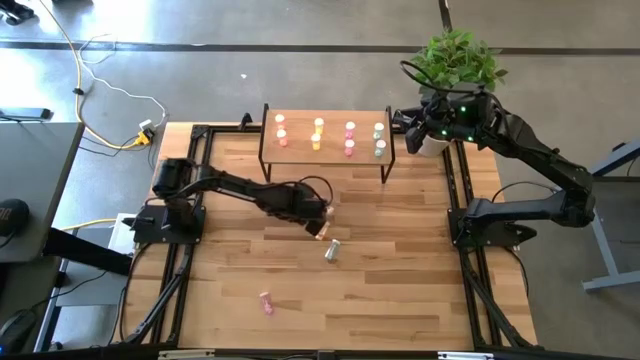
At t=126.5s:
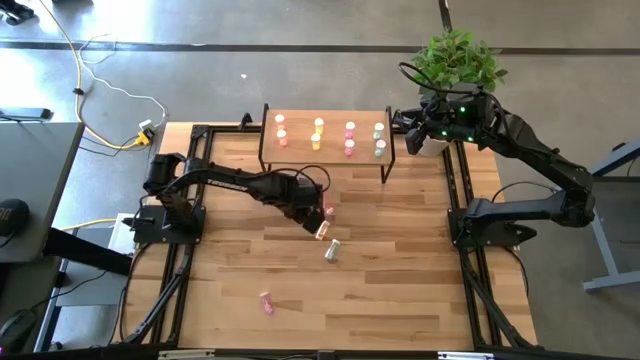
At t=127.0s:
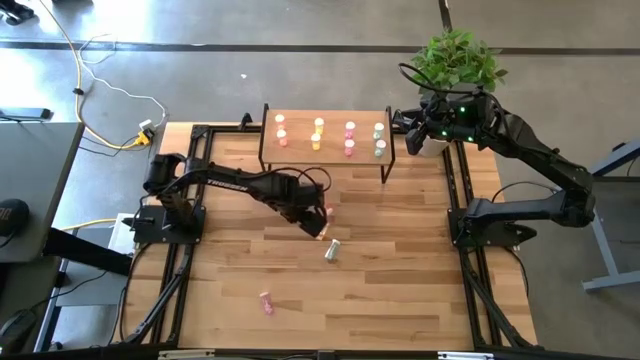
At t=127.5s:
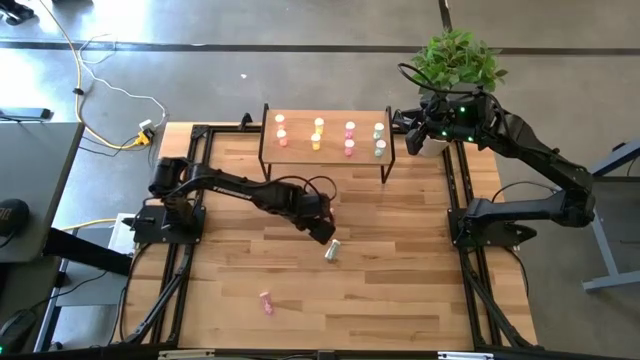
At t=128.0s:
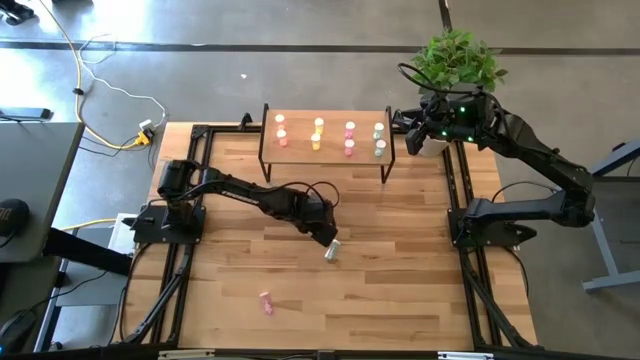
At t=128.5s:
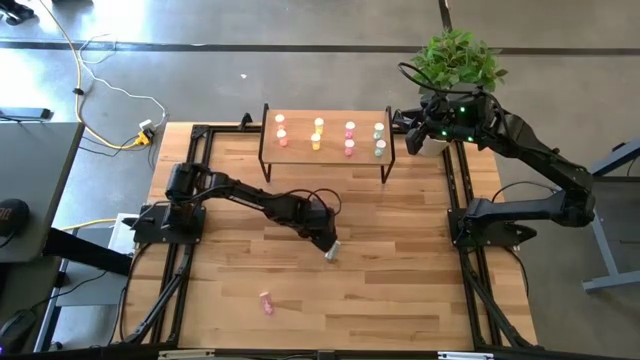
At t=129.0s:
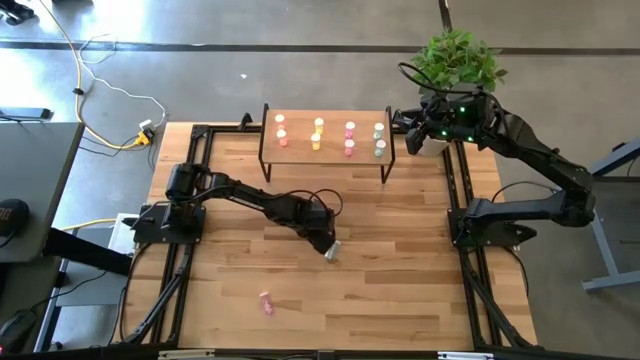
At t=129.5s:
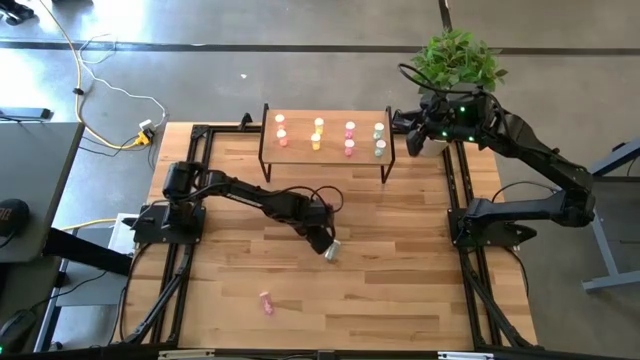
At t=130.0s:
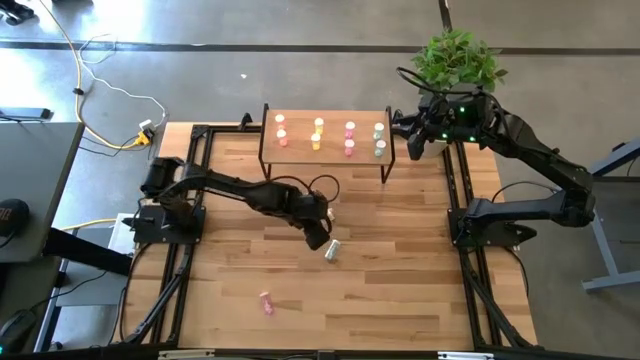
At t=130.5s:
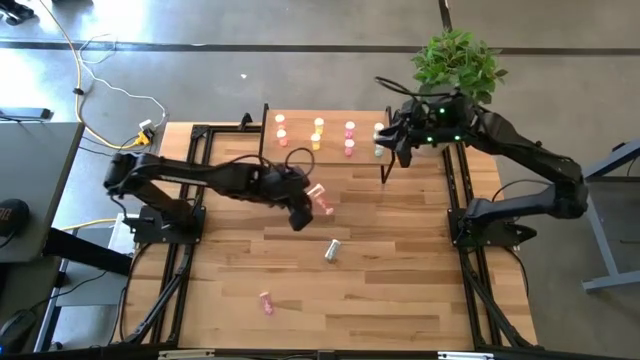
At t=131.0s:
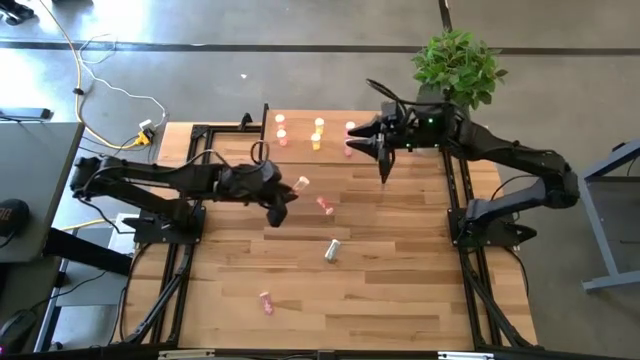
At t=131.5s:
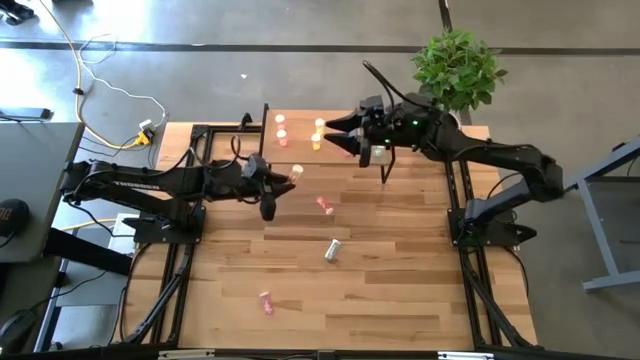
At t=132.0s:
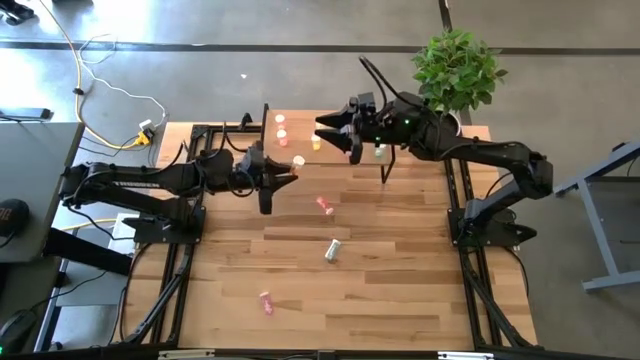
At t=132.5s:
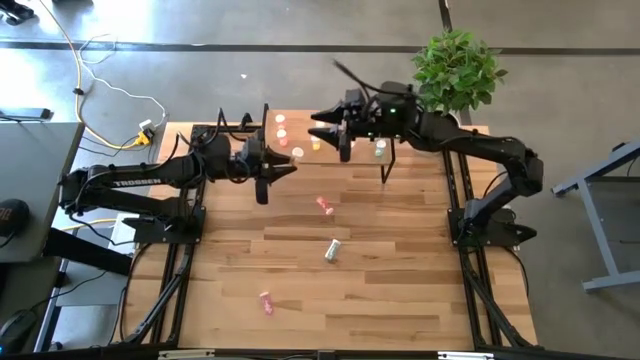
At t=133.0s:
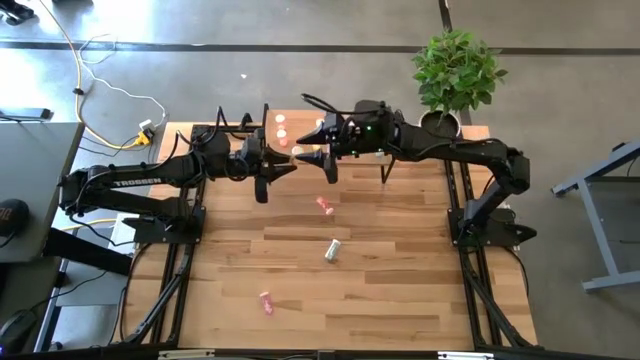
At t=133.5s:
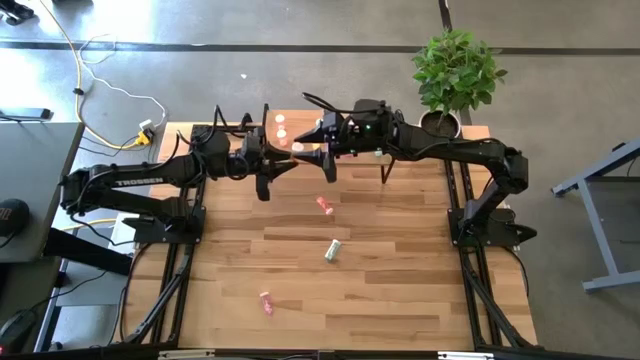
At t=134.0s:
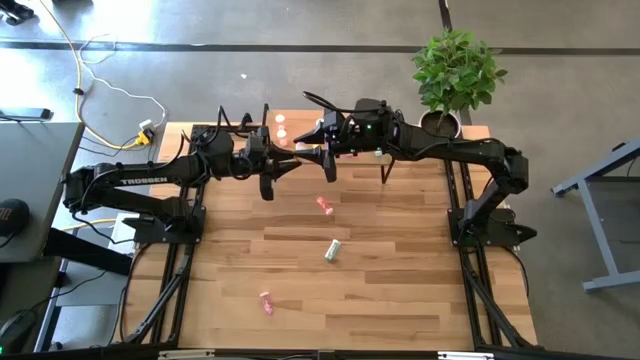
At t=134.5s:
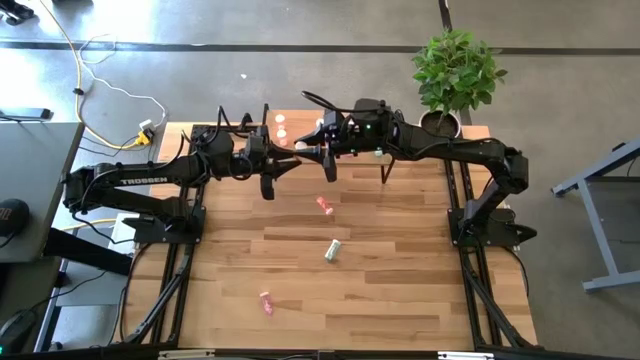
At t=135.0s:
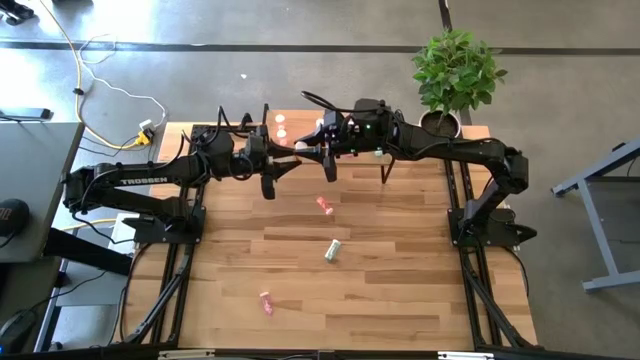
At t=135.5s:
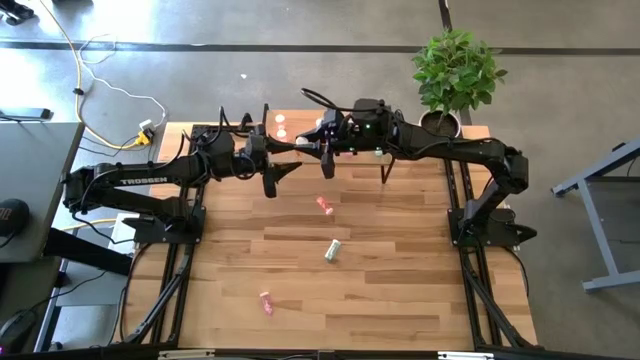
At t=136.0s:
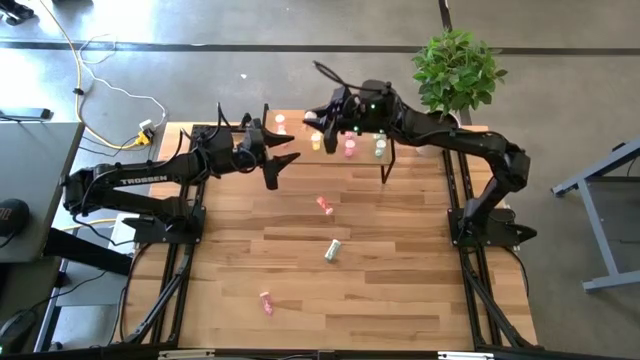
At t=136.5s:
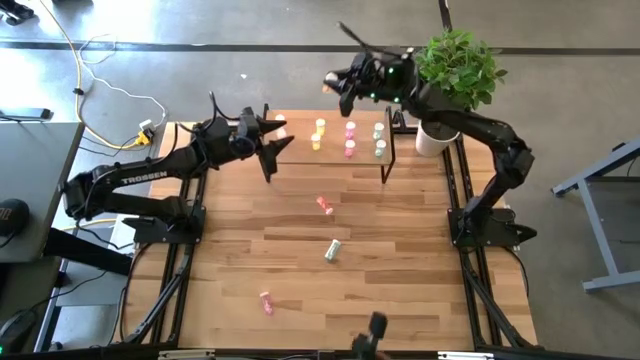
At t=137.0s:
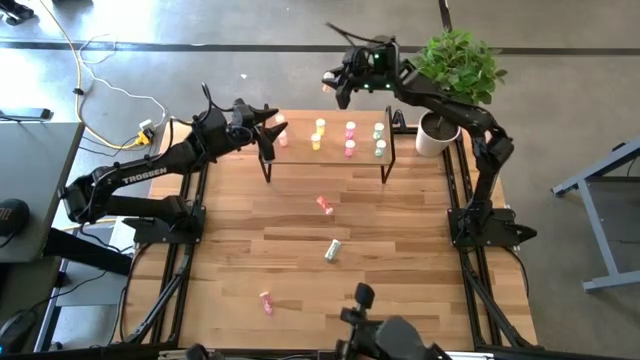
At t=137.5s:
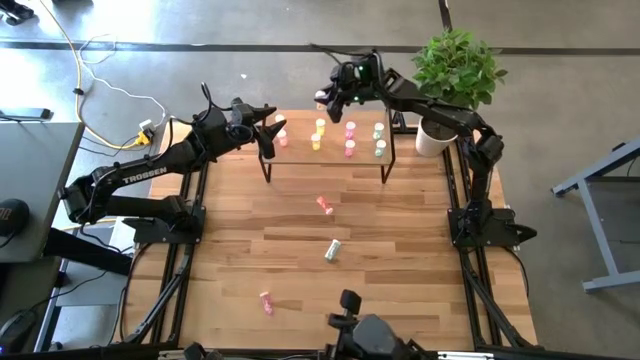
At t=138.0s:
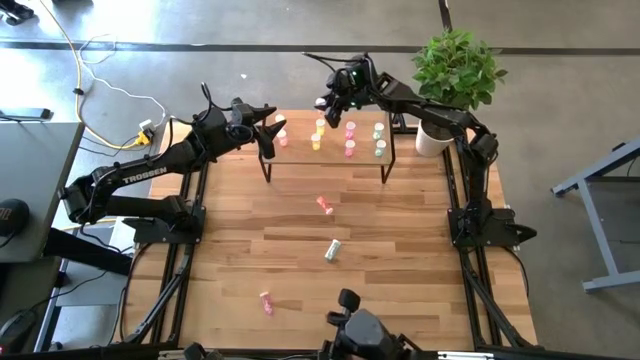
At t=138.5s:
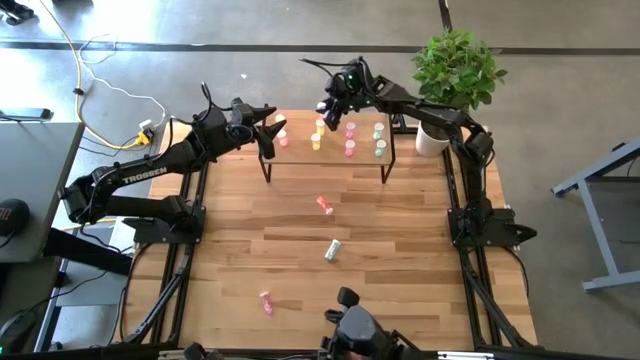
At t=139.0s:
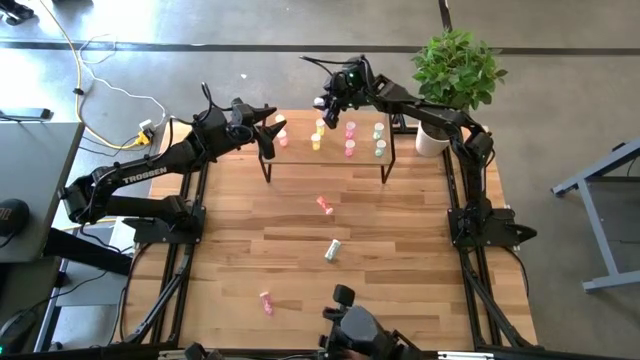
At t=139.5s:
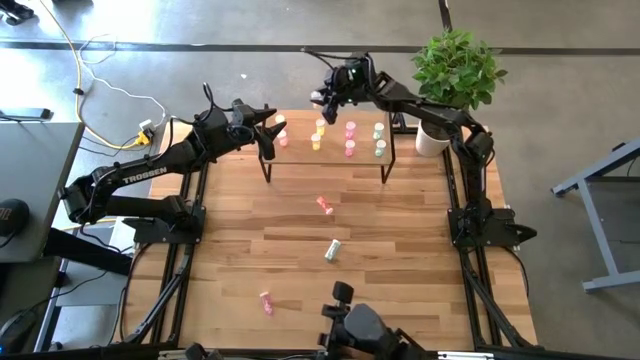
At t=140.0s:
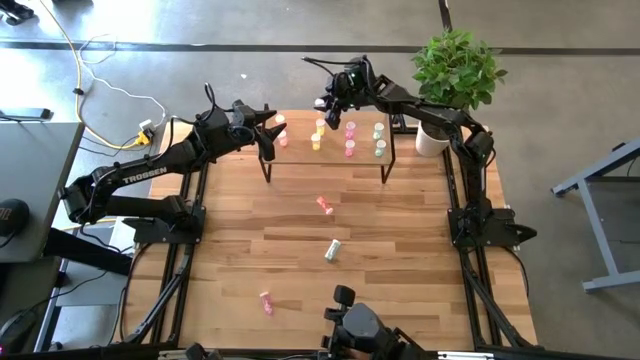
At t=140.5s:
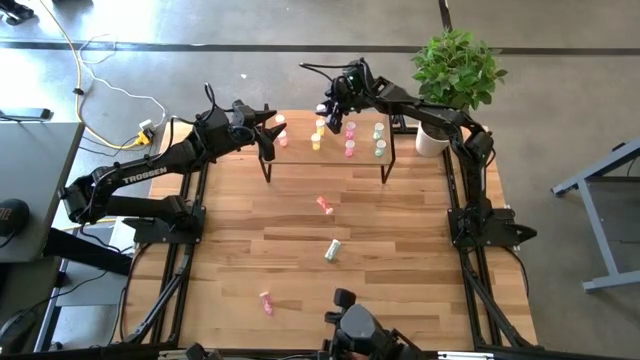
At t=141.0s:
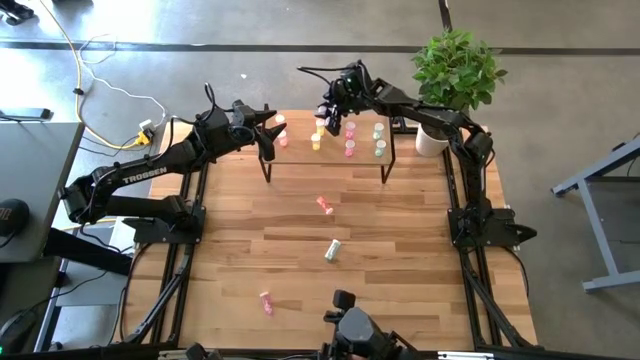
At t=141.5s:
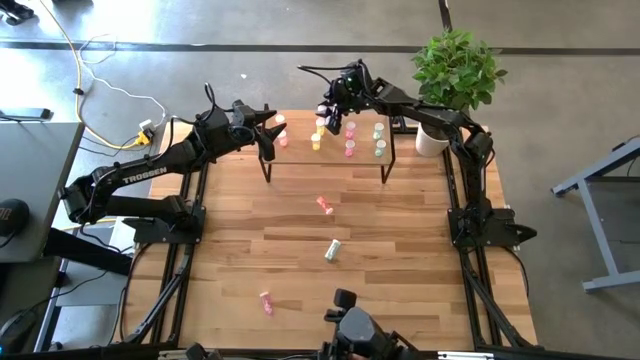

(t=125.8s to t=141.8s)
Task: Pick and place medicine bottles onto shelf by color
Put the yellow pill bottle on the shelf aligned with the yellow pill bottles

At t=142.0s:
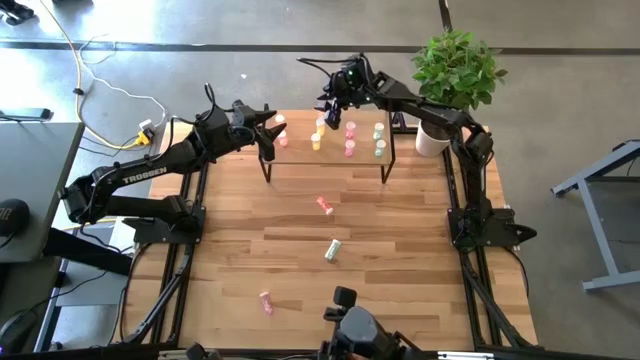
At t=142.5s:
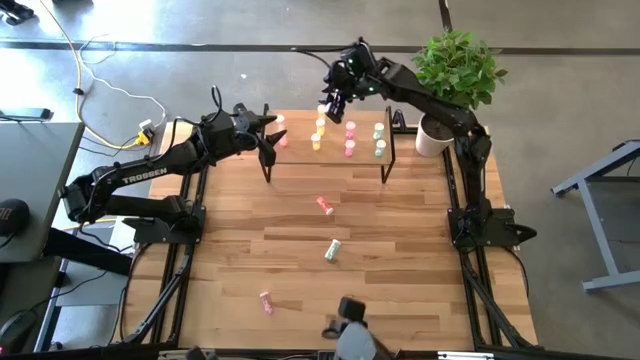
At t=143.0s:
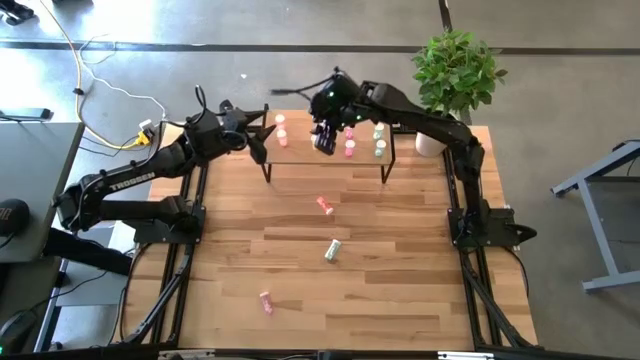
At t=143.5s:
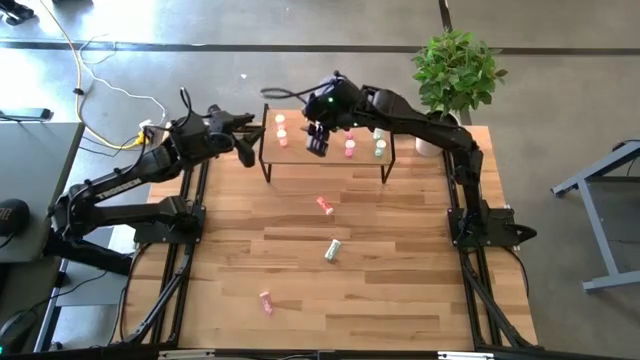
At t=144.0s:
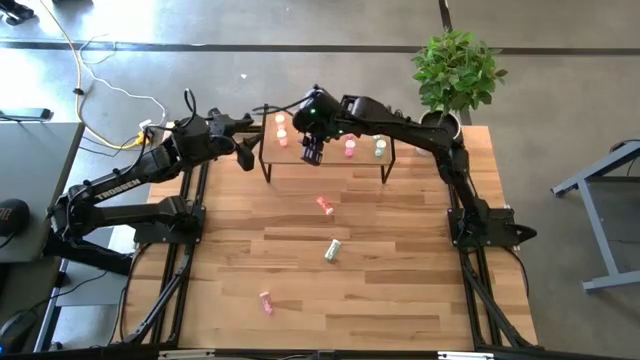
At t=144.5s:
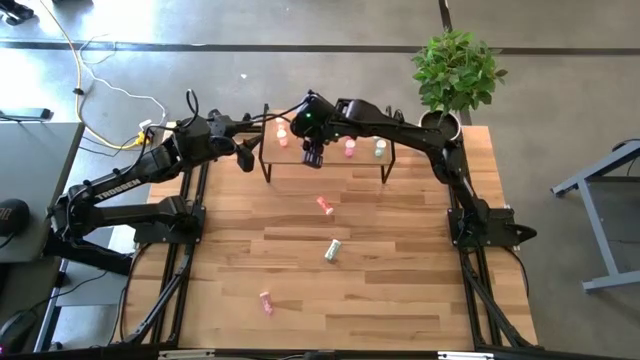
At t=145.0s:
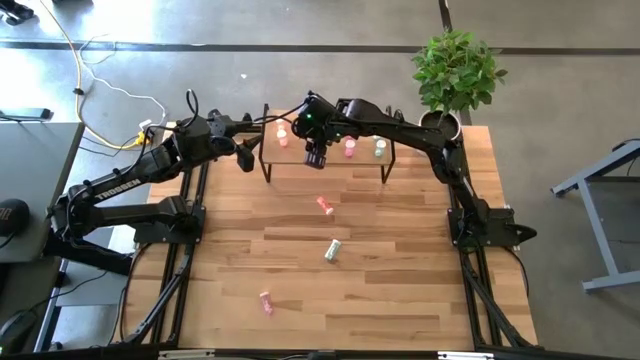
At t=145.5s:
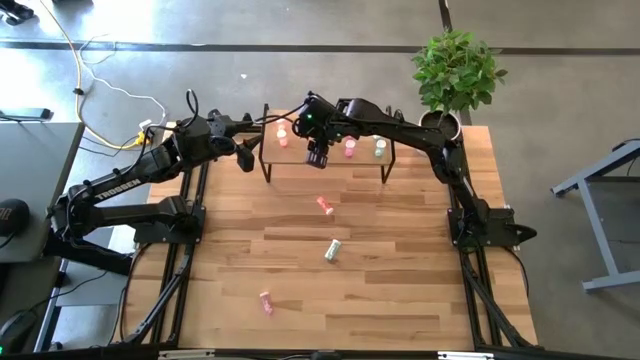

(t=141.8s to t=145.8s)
Adjust the yellow pill bottle on the shelf
